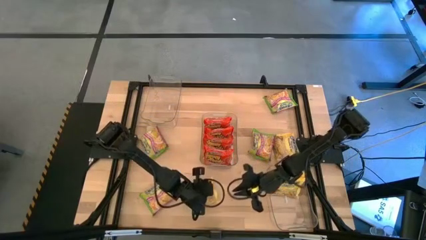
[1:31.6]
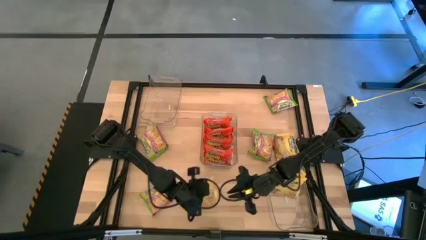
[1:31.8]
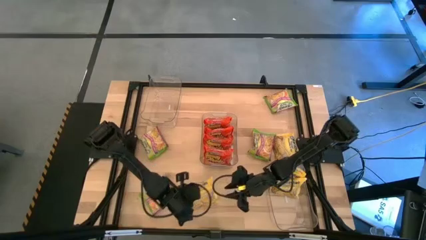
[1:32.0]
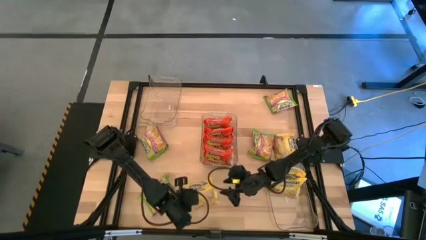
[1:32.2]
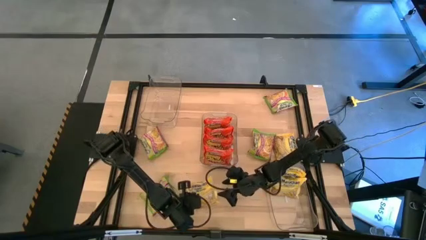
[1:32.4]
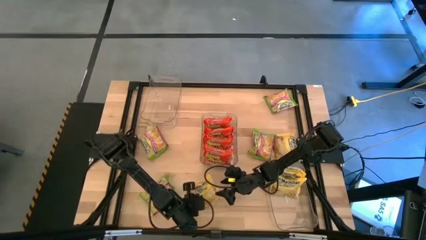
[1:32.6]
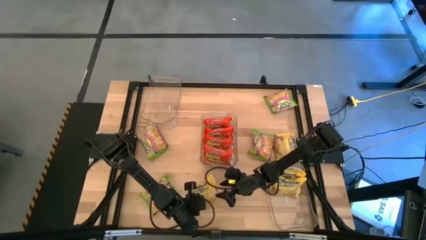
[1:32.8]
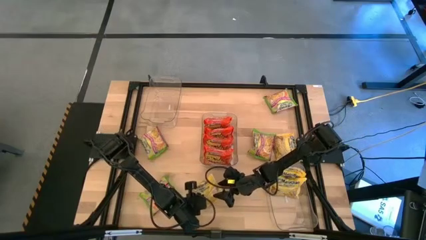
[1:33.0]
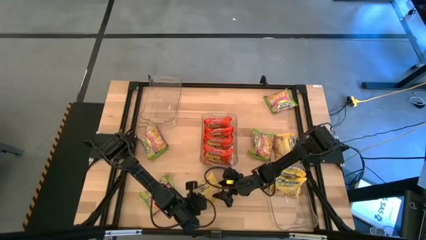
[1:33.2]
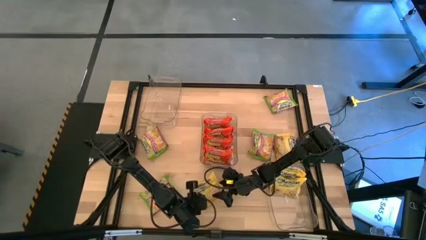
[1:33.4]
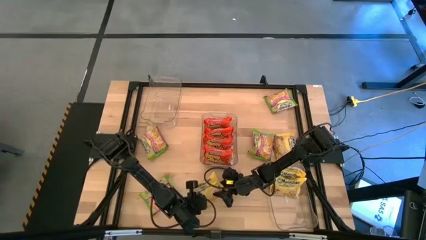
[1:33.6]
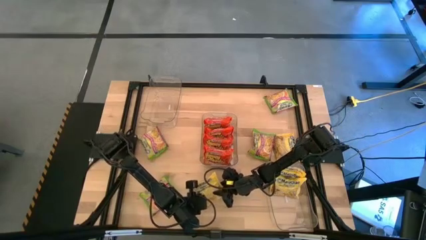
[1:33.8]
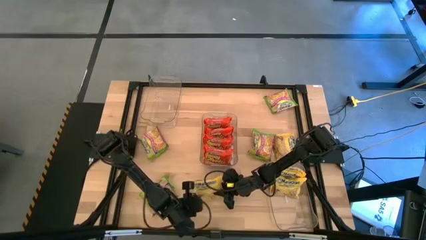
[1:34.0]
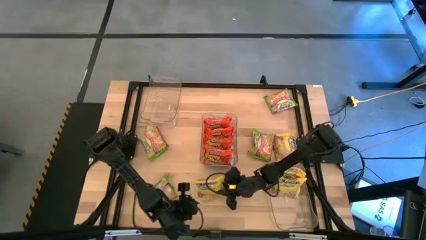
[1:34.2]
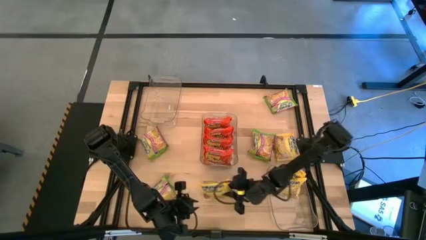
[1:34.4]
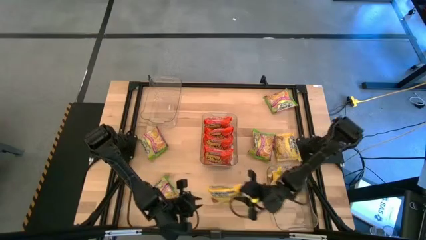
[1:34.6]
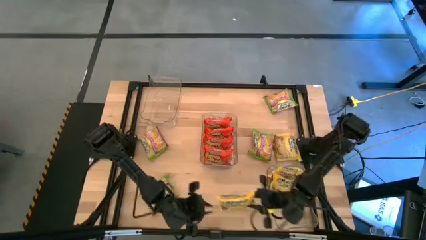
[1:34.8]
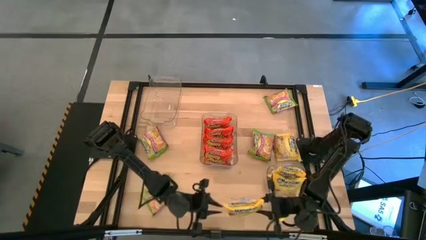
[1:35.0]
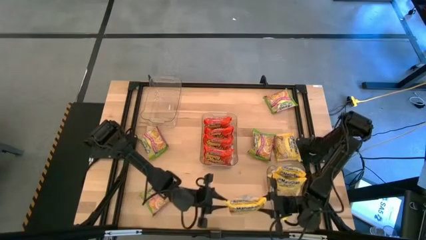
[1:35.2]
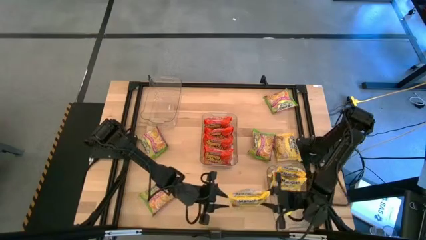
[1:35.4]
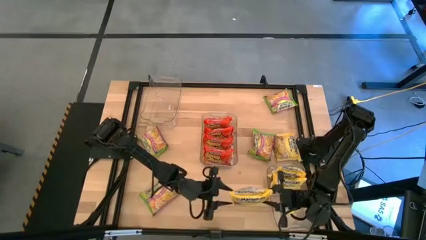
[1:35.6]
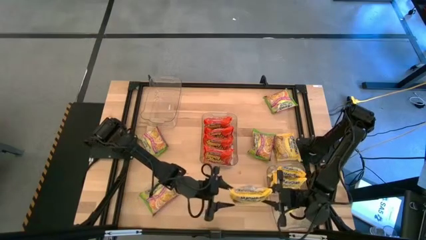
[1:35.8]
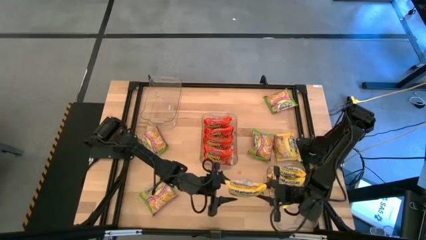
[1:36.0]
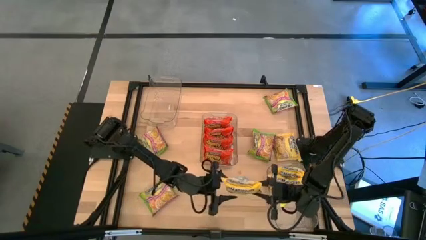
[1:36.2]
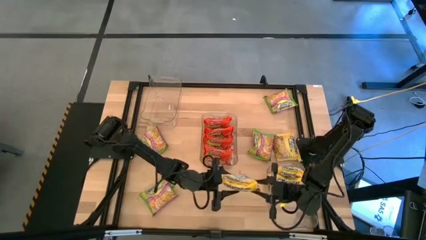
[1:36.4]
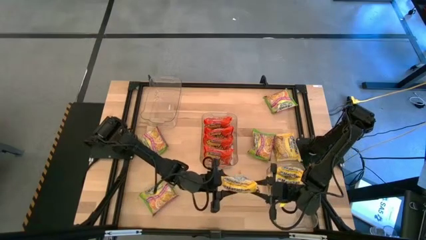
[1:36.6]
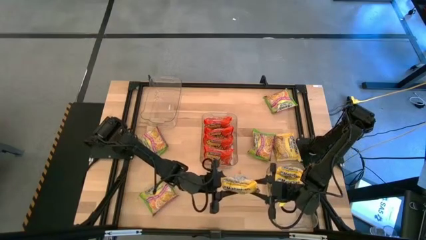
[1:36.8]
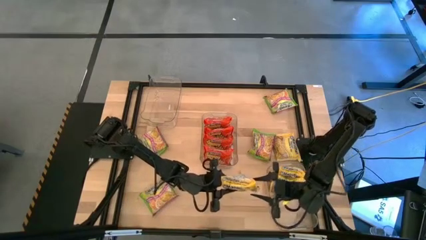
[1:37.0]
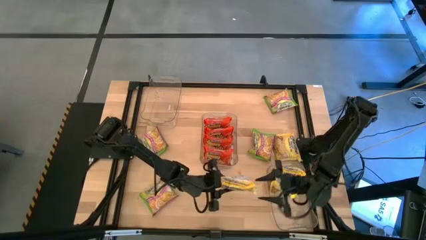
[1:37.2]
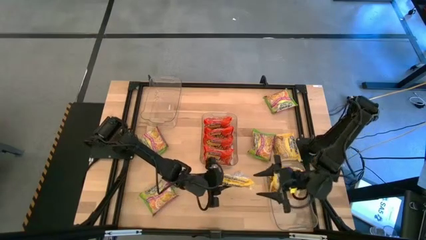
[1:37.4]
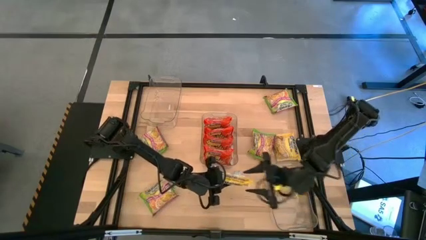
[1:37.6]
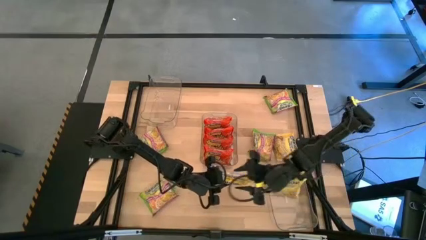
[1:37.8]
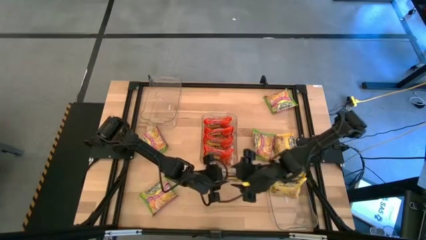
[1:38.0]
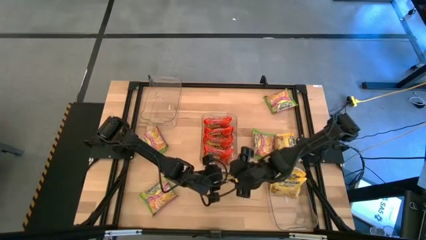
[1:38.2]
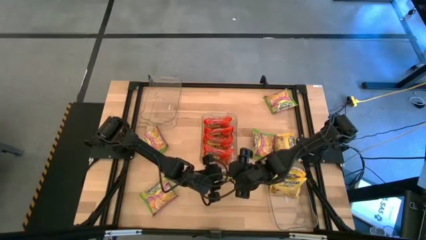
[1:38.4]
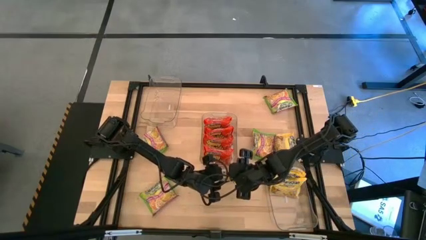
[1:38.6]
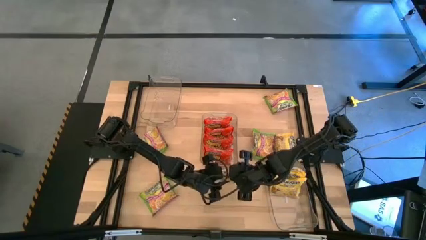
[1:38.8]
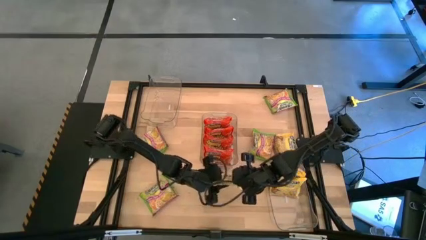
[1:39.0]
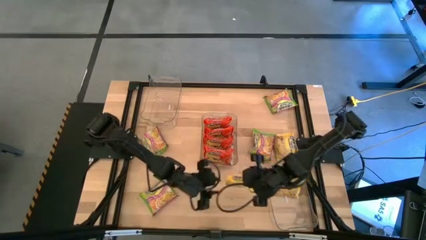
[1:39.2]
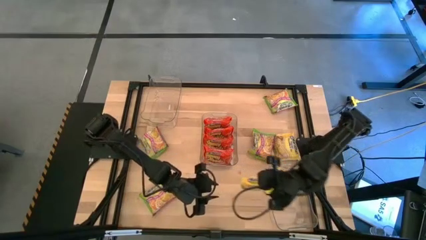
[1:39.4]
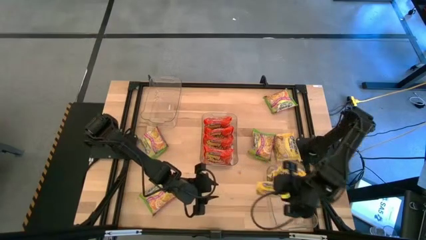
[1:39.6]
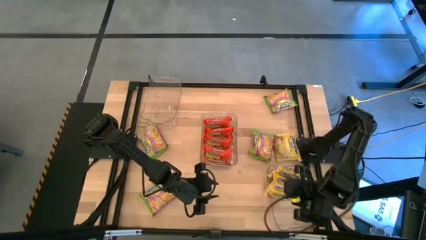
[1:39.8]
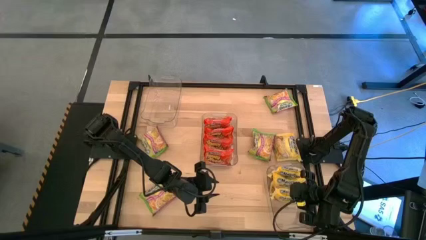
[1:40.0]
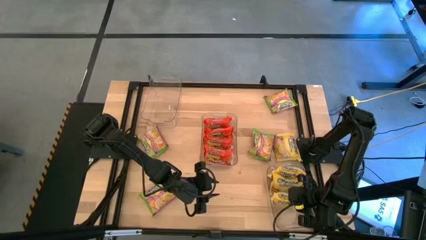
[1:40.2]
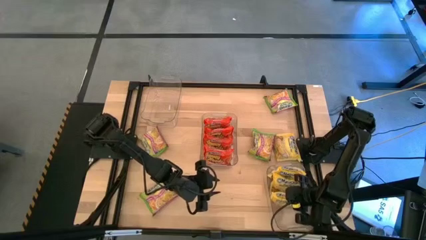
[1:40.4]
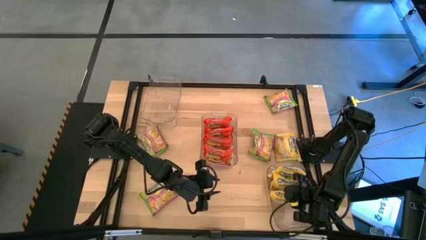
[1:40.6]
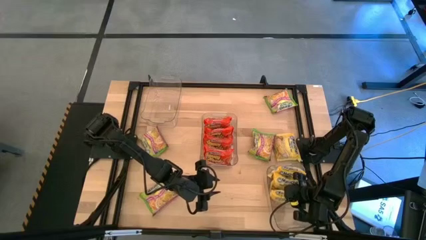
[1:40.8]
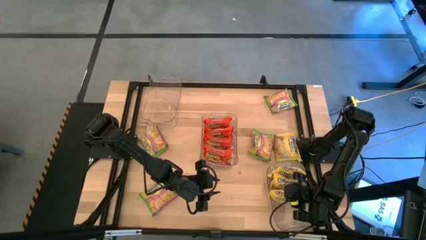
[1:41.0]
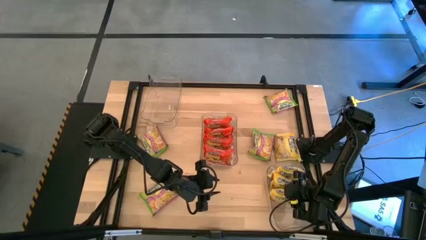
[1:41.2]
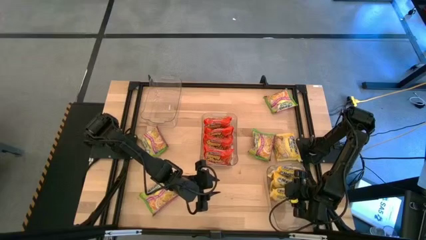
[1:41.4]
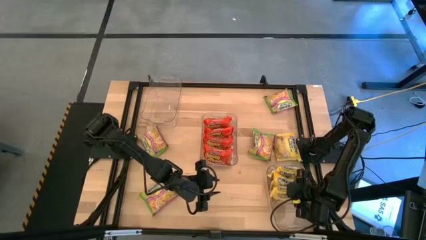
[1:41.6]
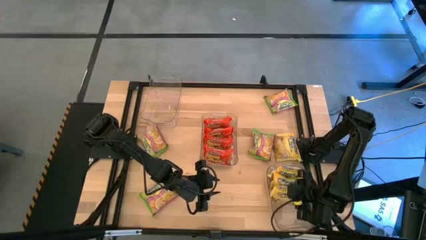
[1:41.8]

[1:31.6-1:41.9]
Task: Sort Maruchan noodles
Put the bottom yellow noodle pack into the bottom transparent bin

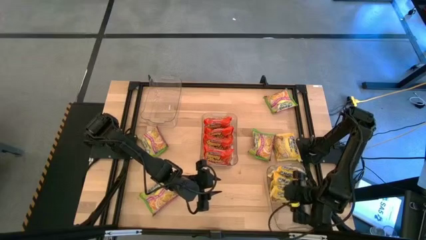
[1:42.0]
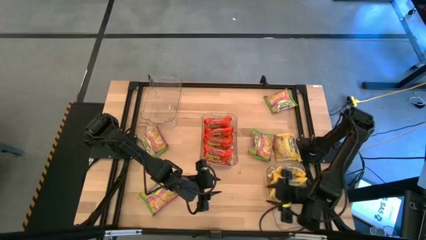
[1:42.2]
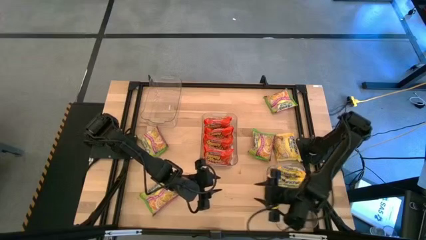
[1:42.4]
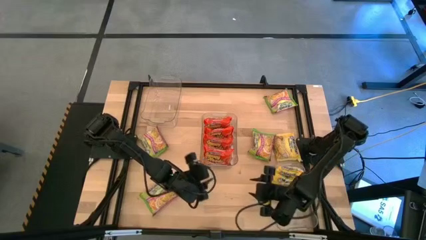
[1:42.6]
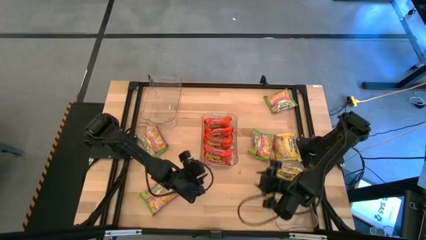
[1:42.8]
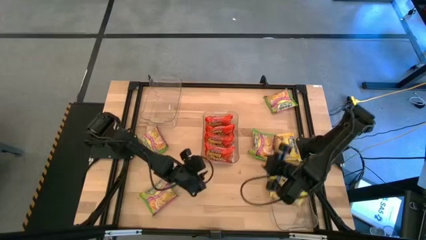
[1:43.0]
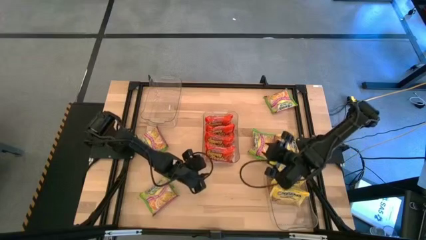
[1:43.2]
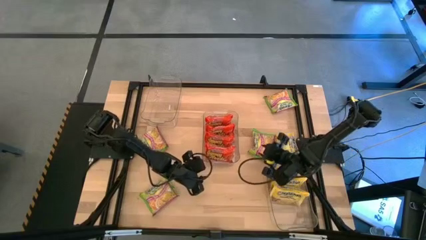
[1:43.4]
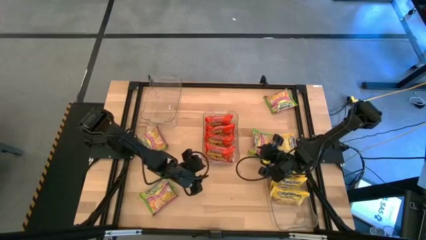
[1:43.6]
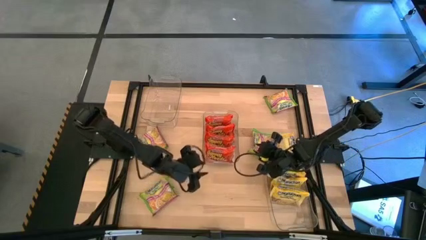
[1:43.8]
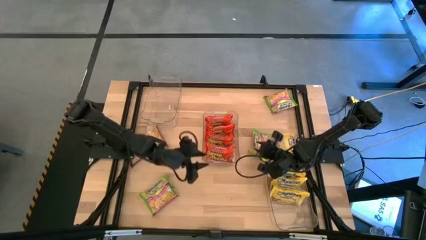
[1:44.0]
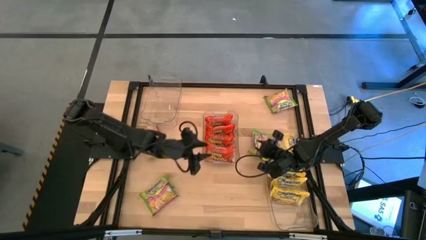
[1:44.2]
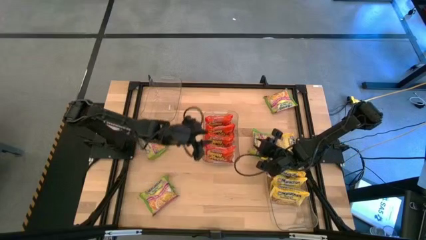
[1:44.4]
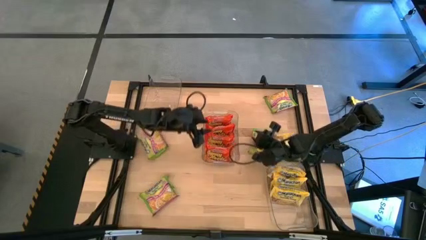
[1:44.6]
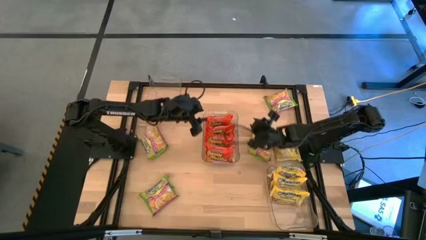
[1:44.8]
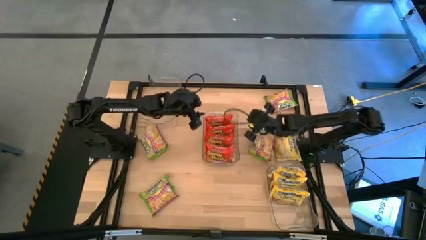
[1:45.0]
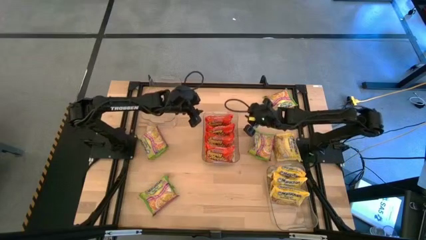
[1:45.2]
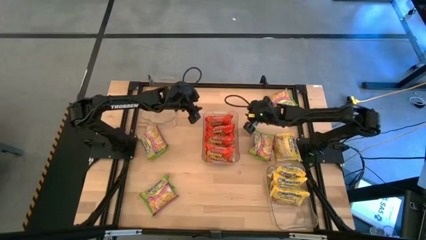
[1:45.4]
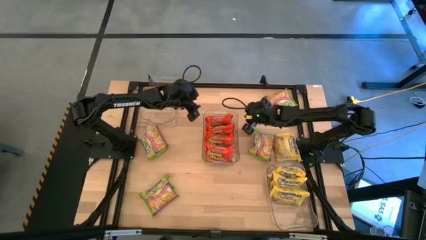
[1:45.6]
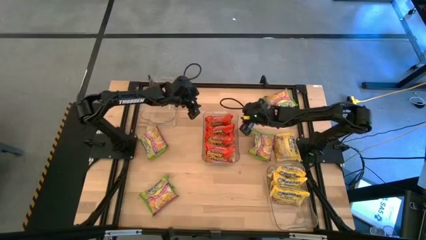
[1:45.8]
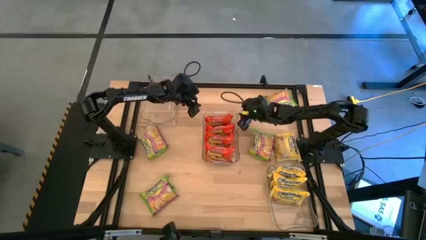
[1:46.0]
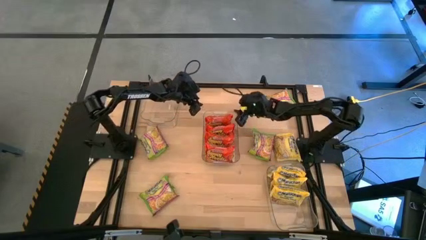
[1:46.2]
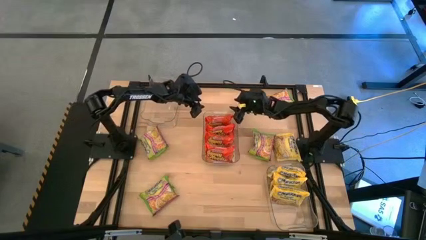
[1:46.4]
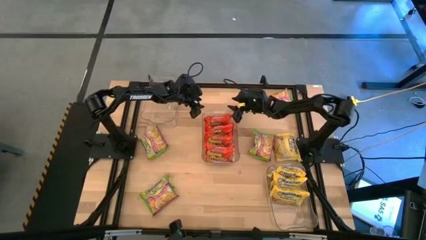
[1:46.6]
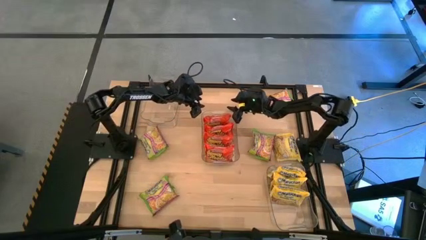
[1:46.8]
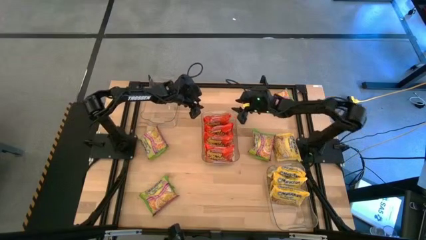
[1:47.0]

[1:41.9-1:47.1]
Adjust the transparent bin on the table
